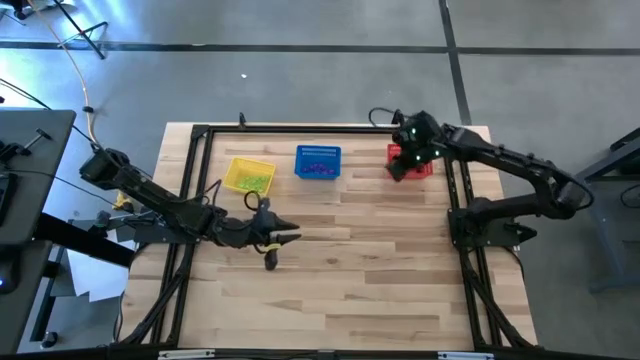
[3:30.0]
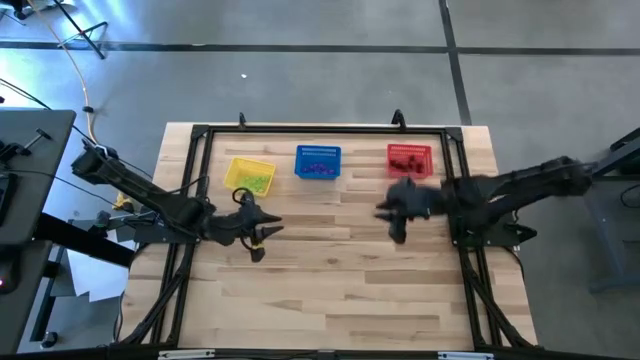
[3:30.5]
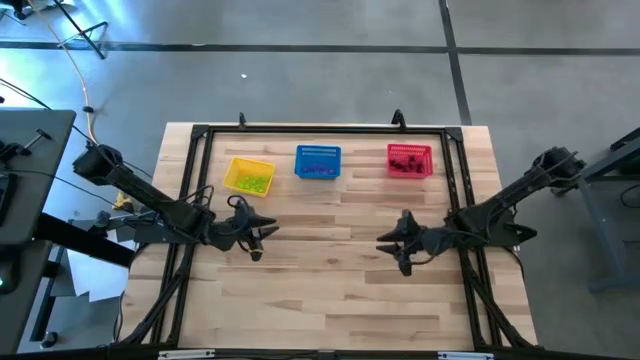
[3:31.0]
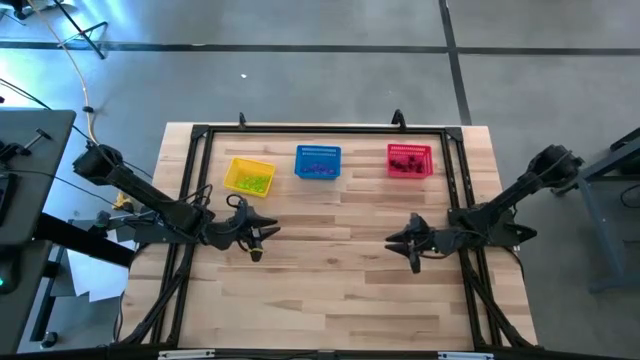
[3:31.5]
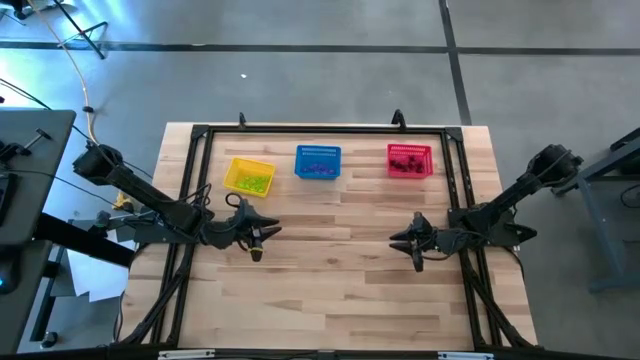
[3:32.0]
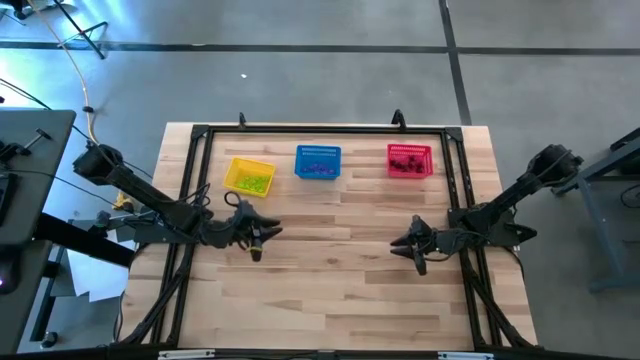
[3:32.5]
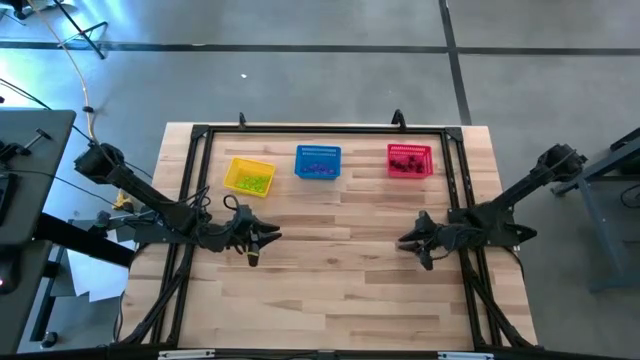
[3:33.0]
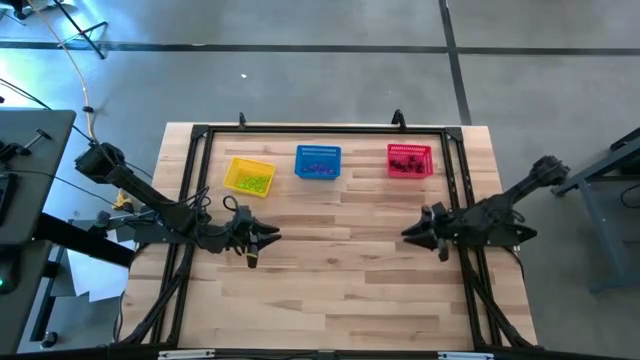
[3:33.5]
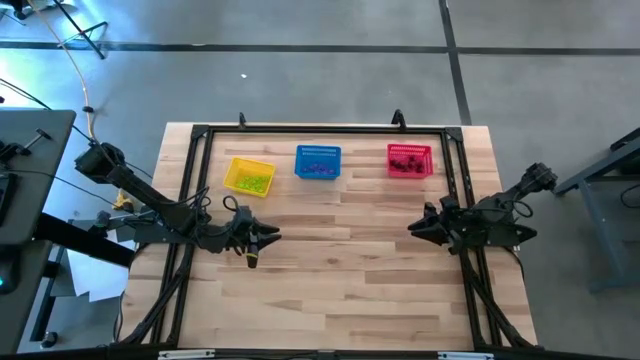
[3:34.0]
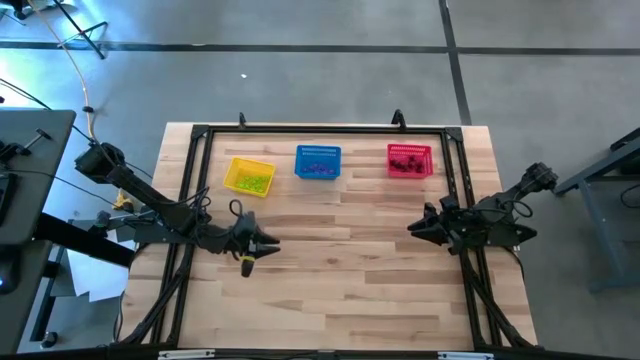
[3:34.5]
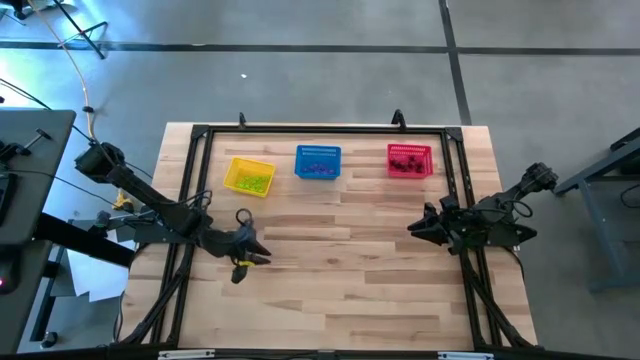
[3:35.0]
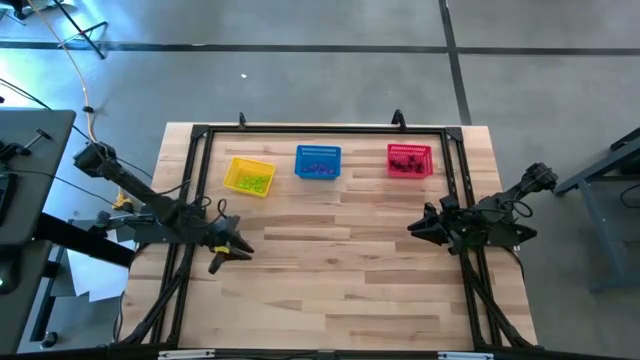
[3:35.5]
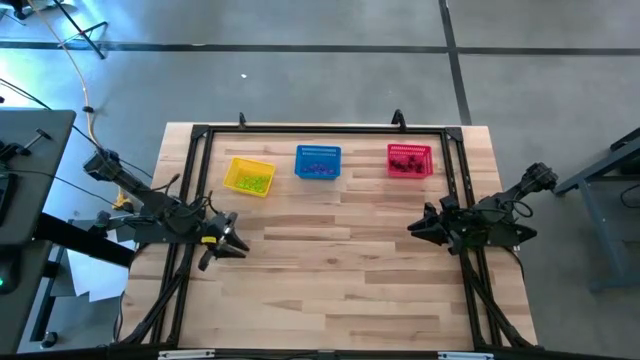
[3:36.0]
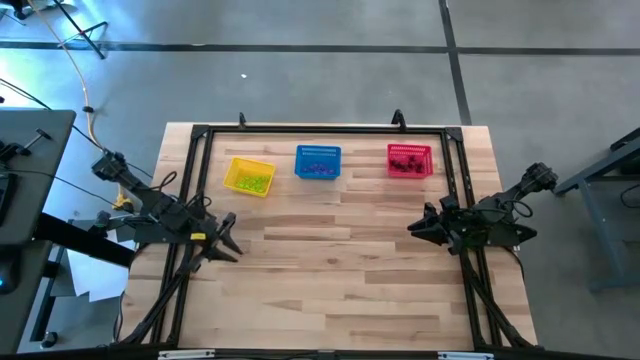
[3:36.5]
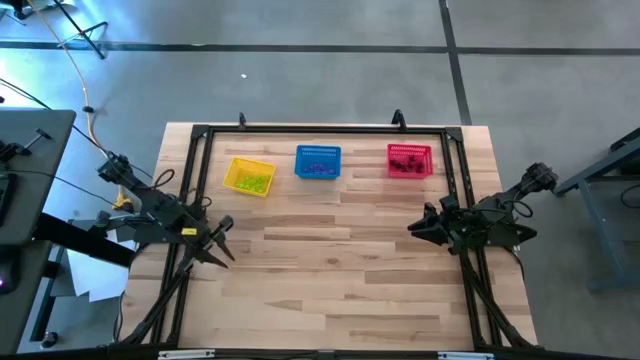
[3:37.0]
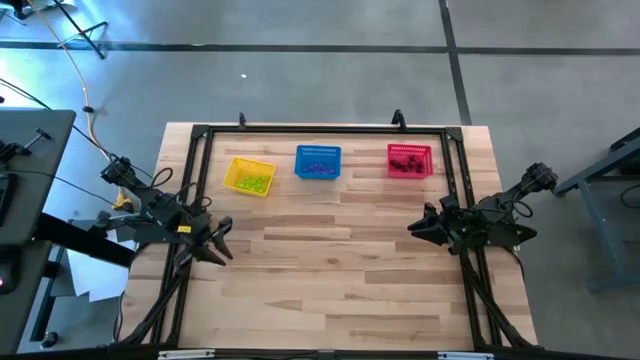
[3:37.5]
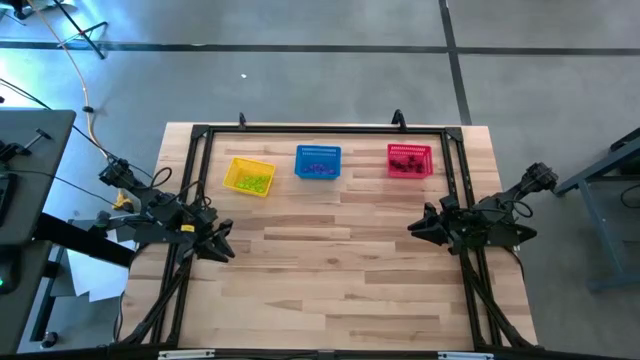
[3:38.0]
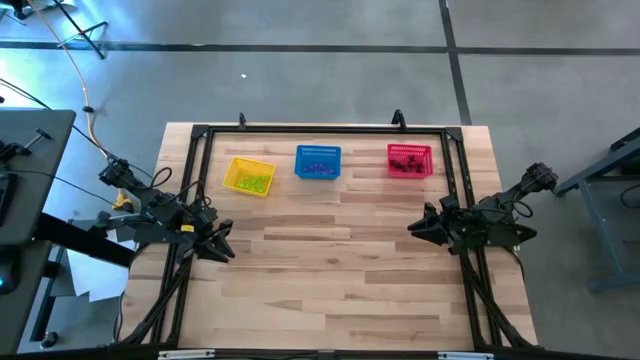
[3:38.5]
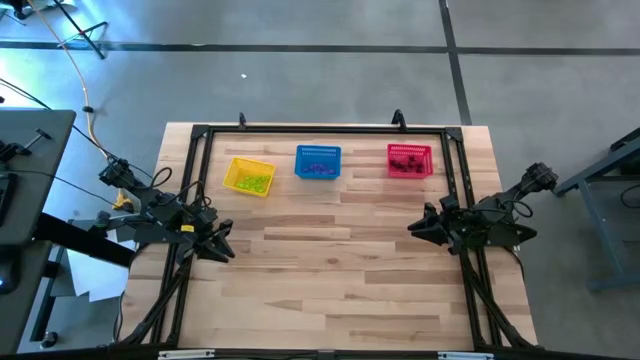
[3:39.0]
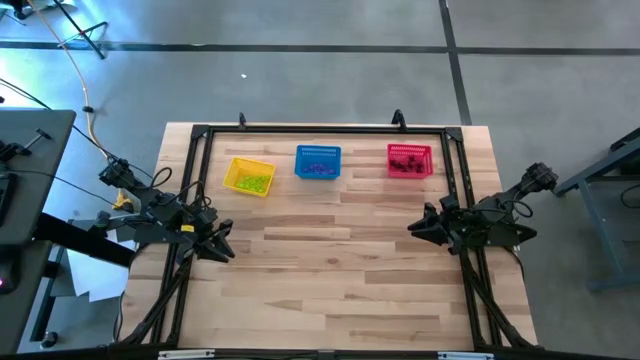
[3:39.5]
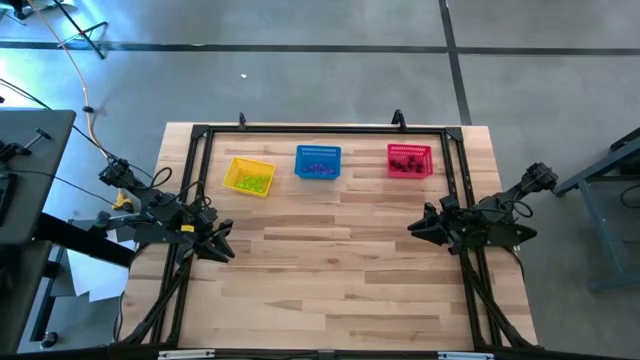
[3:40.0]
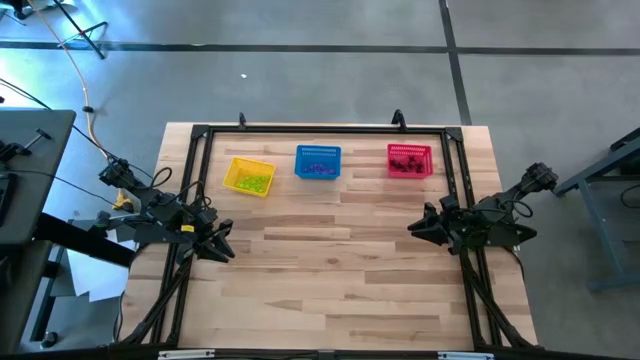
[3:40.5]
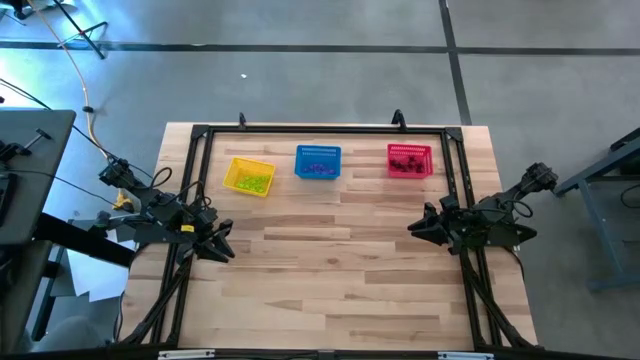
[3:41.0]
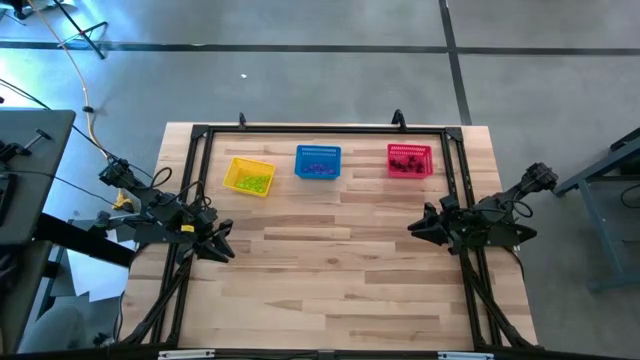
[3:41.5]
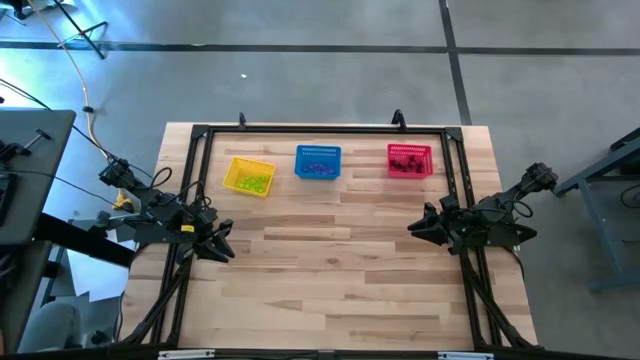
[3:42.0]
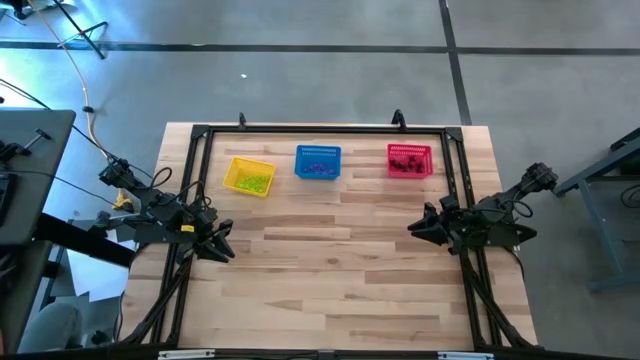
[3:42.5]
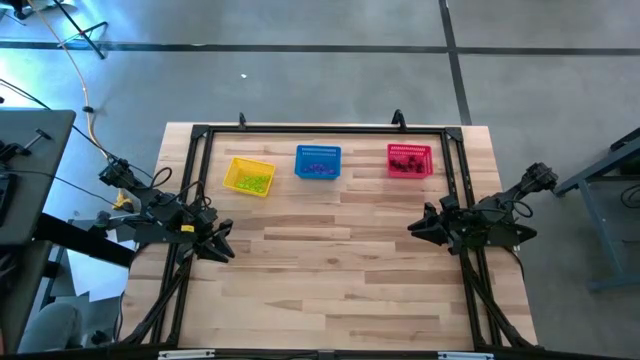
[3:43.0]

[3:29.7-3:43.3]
Task: Sort Halloween decoration
Return to Home Position

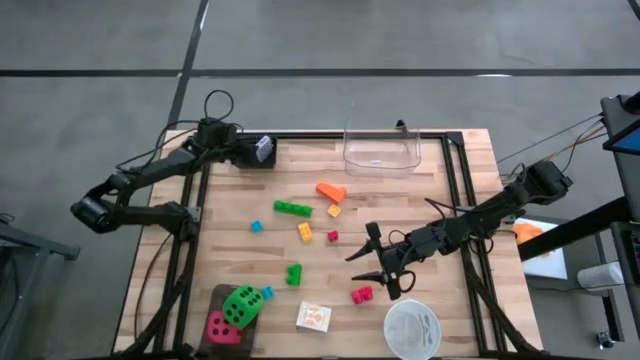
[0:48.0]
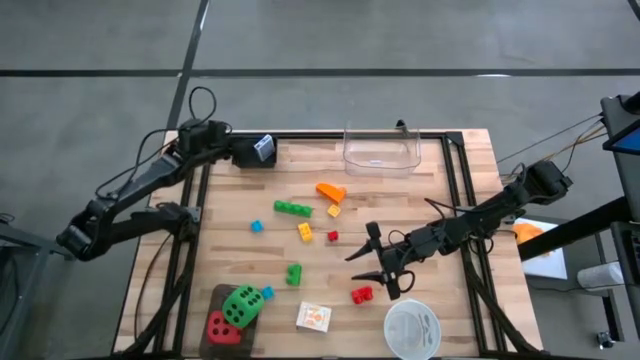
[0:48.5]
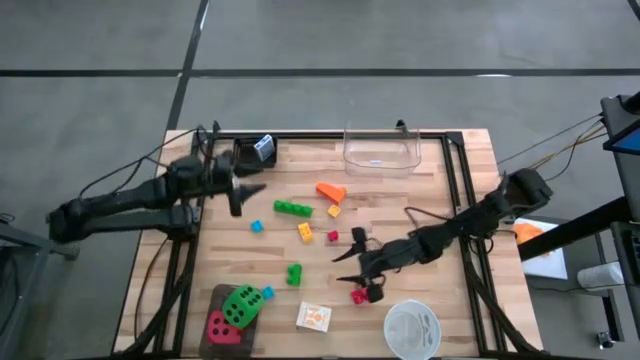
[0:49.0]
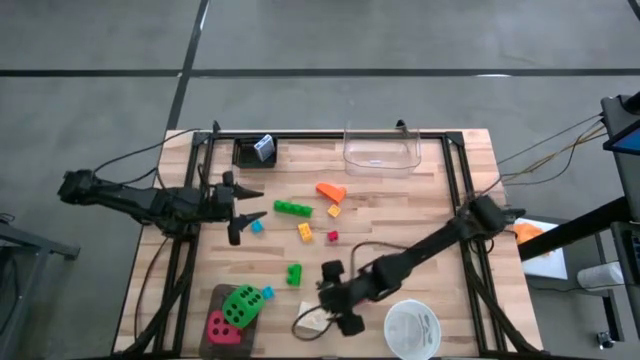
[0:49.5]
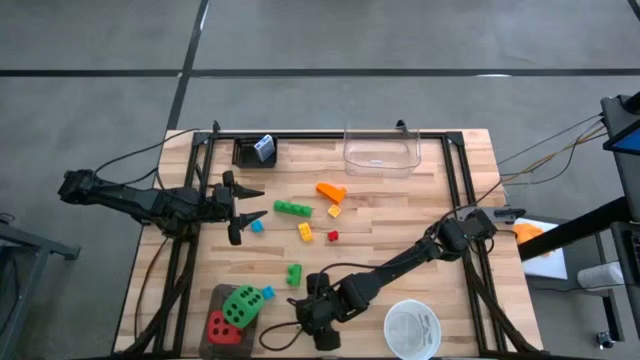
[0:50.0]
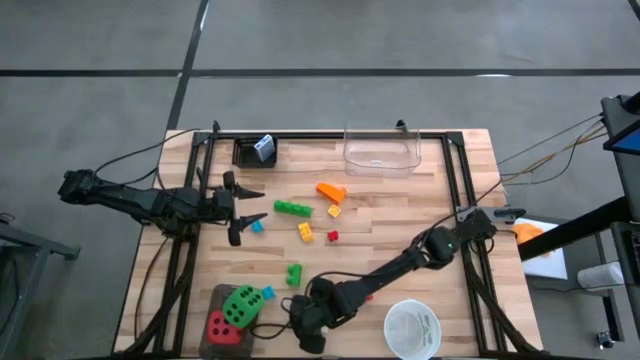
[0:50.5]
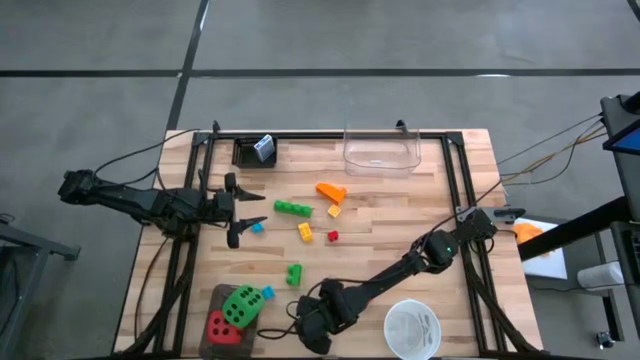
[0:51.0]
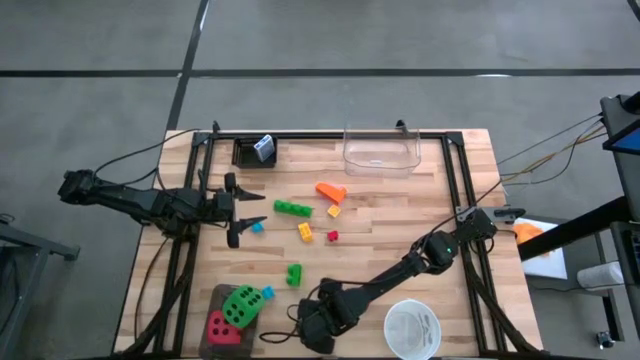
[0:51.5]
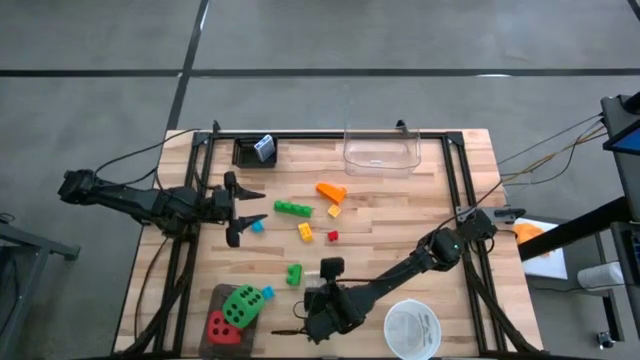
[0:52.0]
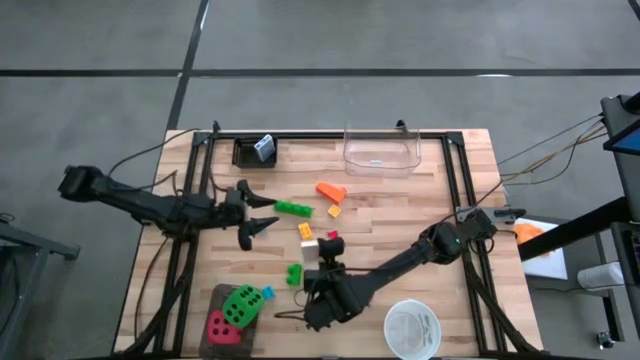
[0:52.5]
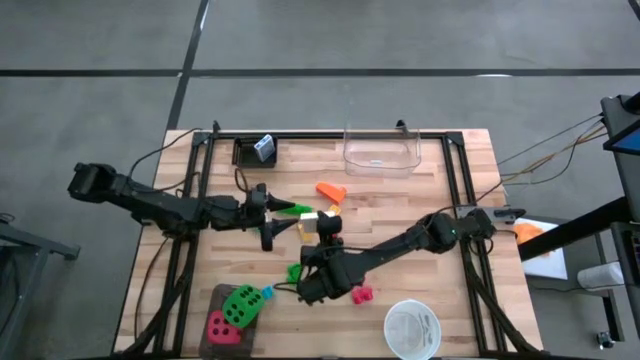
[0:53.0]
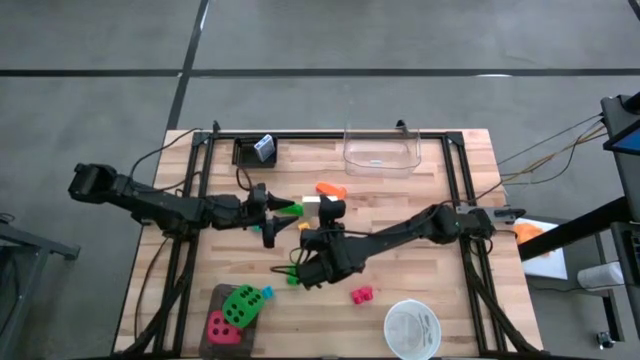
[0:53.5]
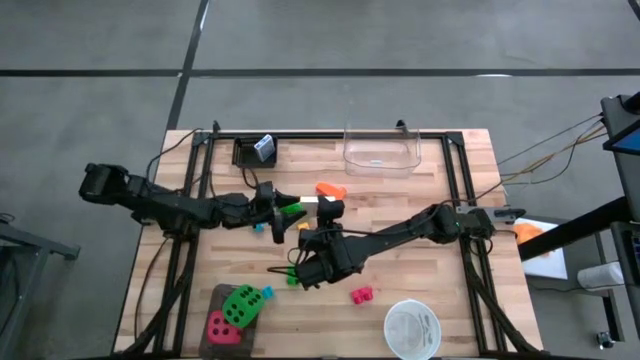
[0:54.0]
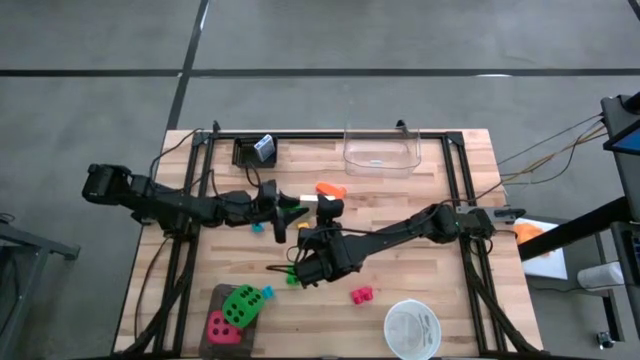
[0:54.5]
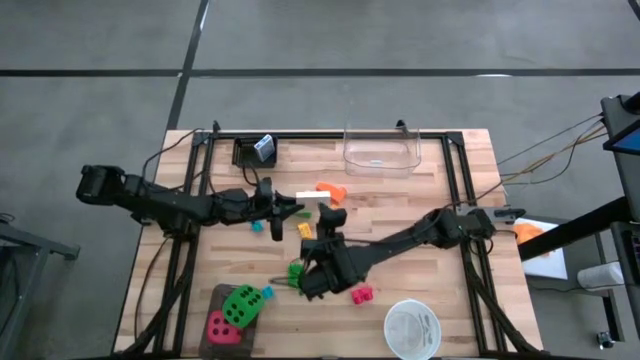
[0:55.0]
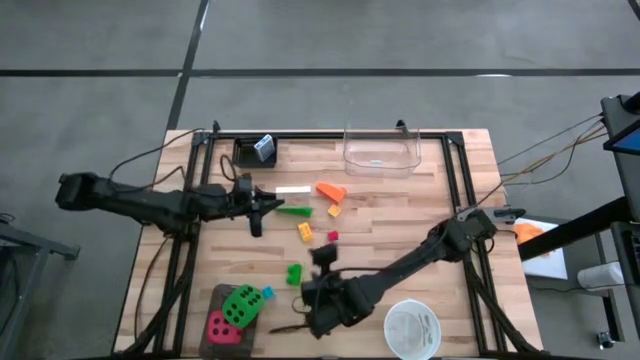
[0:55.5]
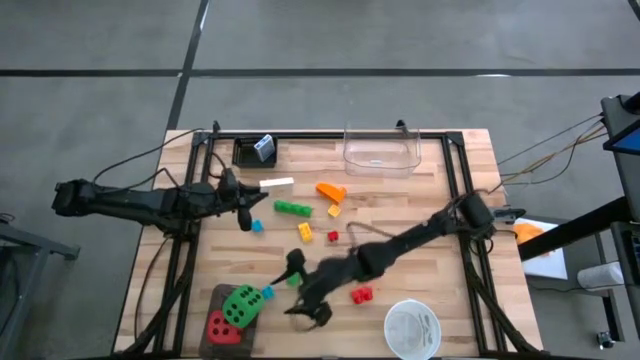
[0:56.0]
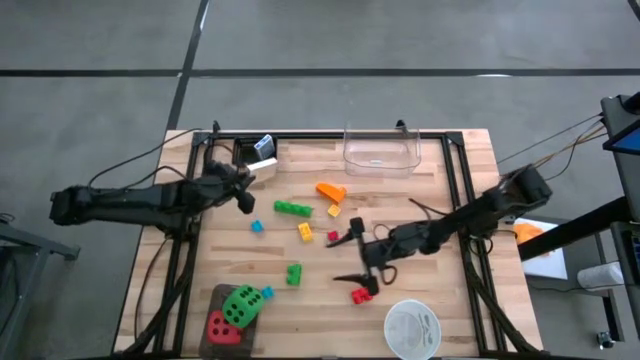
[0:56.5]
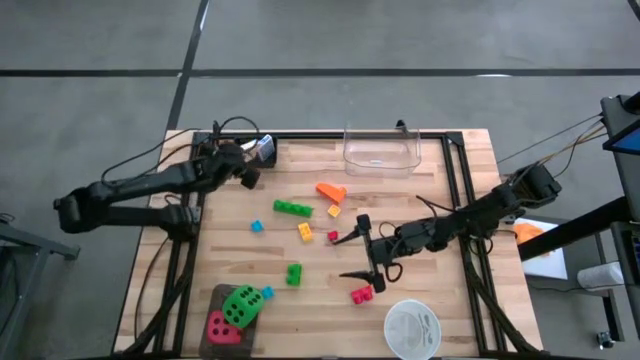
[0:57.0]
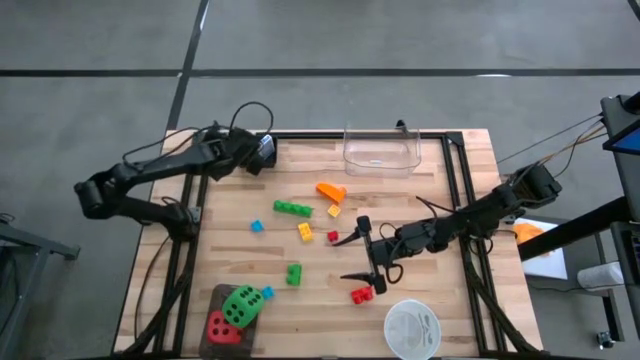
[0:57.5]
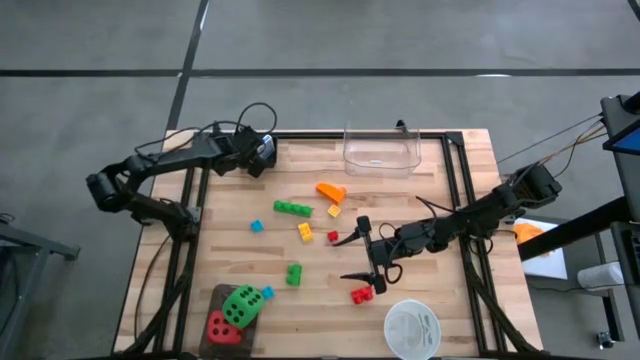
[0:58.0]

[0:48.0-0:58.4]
Task: Pick & Place Toys
Put the yellow playing card box into the black bin
